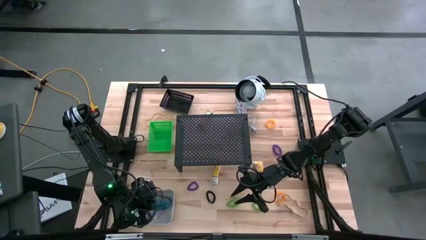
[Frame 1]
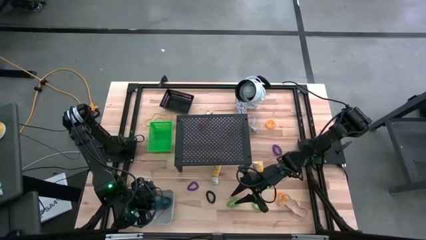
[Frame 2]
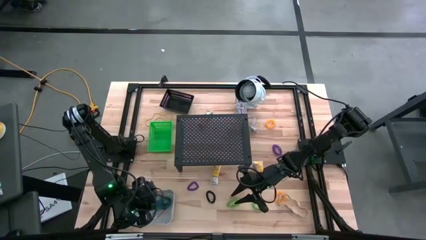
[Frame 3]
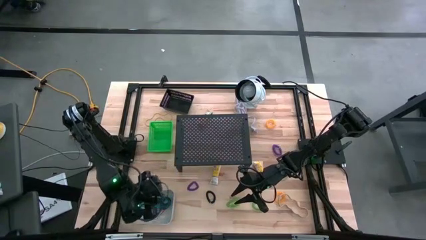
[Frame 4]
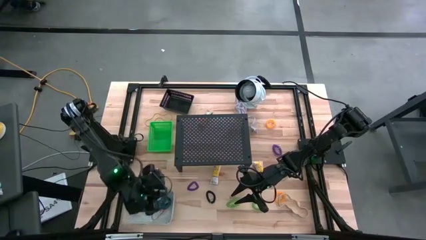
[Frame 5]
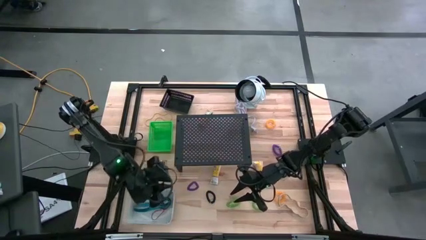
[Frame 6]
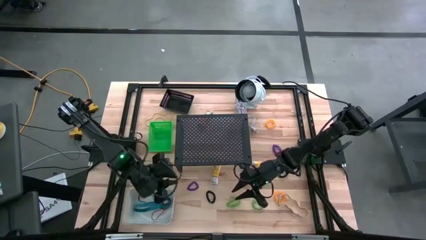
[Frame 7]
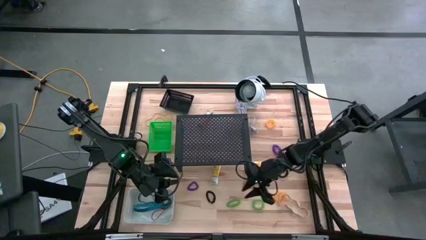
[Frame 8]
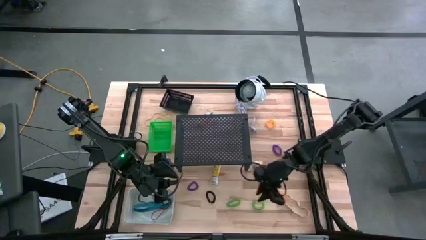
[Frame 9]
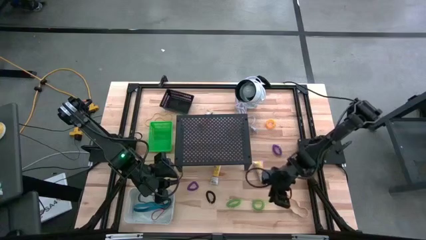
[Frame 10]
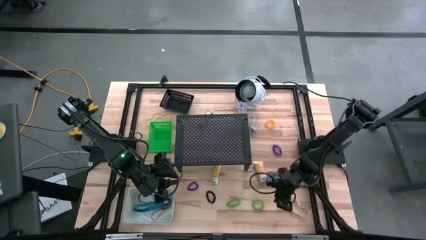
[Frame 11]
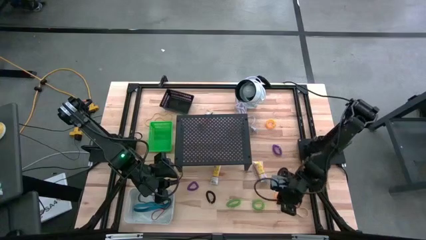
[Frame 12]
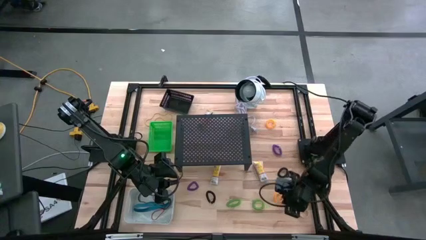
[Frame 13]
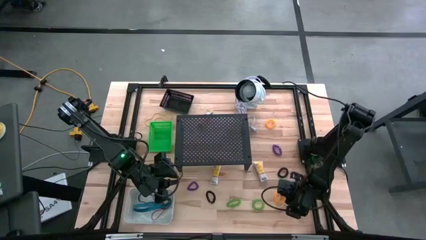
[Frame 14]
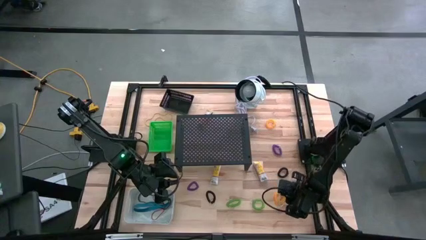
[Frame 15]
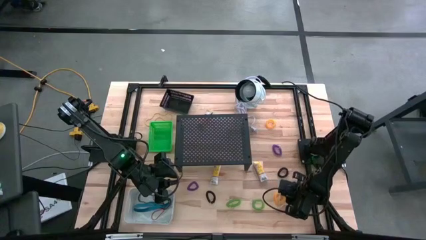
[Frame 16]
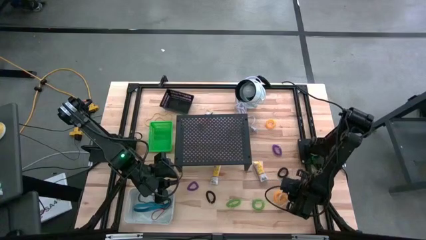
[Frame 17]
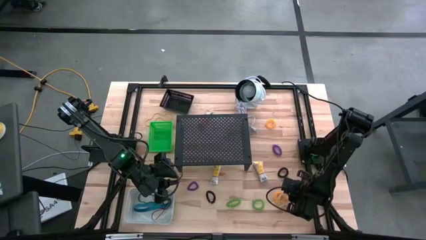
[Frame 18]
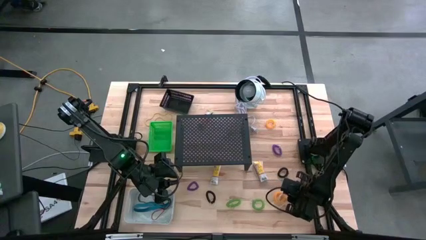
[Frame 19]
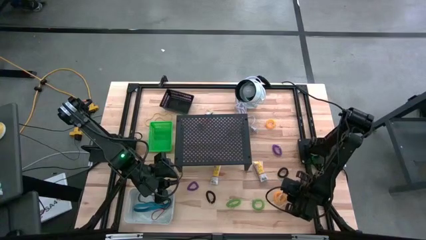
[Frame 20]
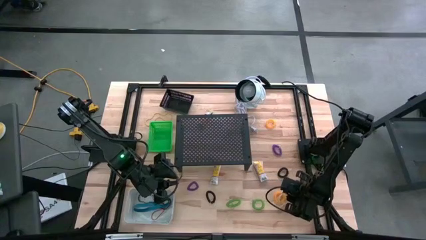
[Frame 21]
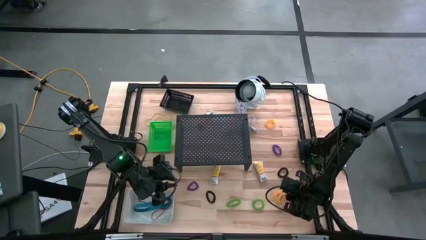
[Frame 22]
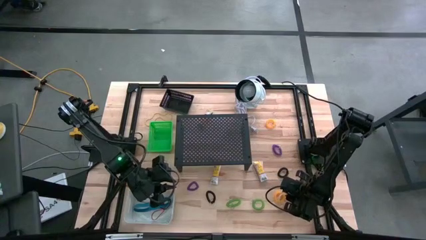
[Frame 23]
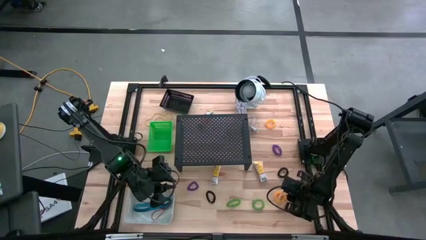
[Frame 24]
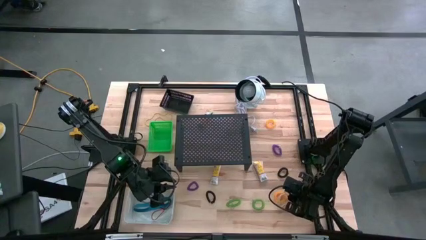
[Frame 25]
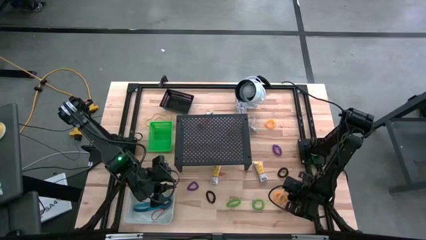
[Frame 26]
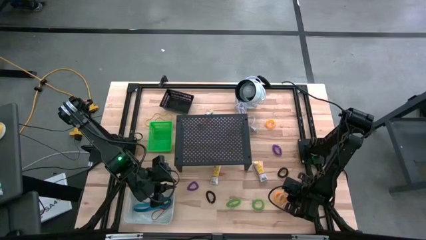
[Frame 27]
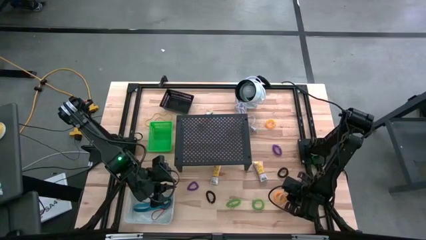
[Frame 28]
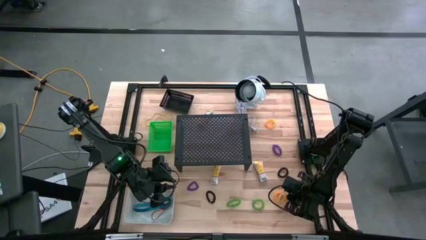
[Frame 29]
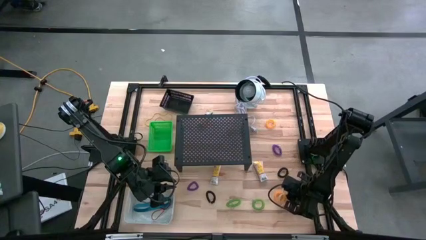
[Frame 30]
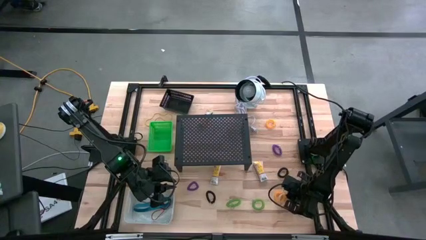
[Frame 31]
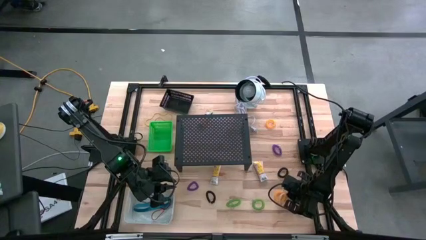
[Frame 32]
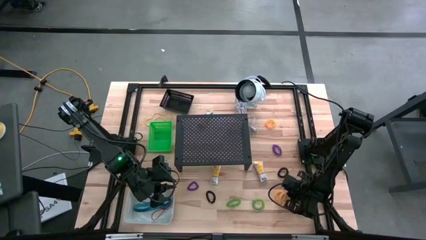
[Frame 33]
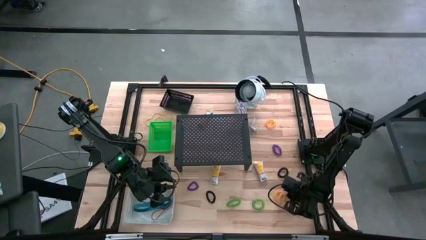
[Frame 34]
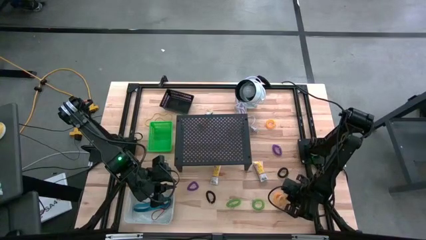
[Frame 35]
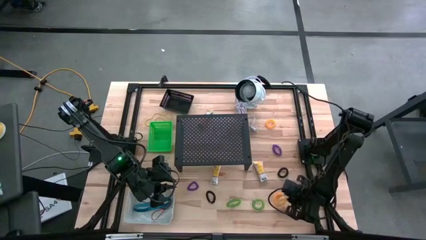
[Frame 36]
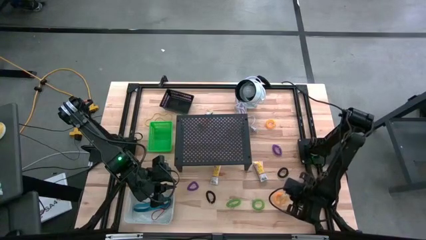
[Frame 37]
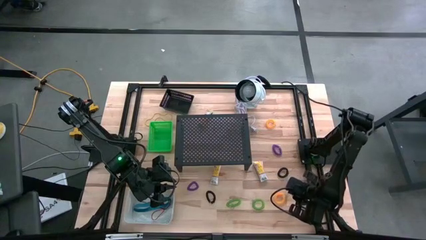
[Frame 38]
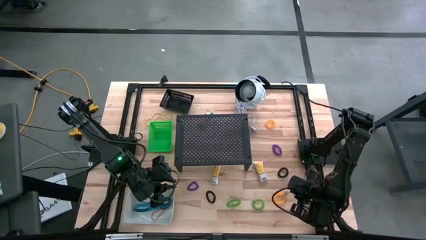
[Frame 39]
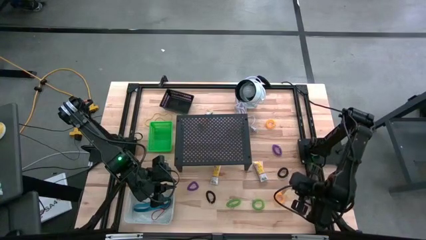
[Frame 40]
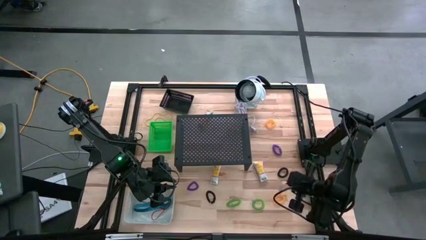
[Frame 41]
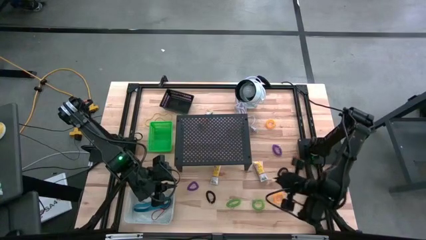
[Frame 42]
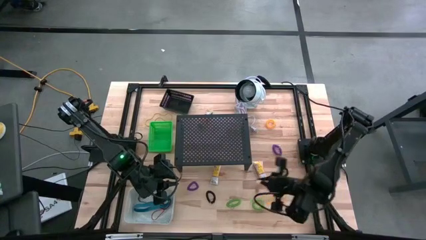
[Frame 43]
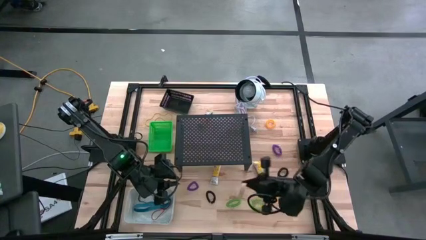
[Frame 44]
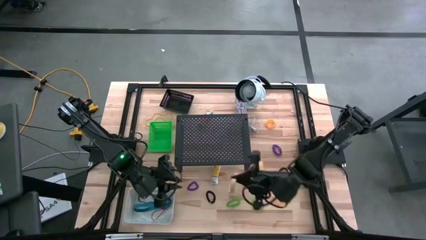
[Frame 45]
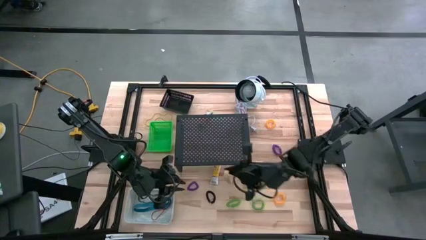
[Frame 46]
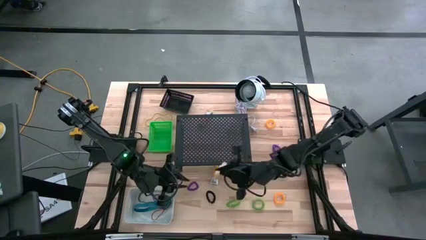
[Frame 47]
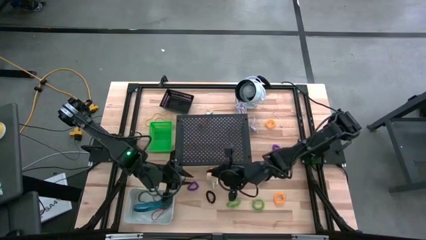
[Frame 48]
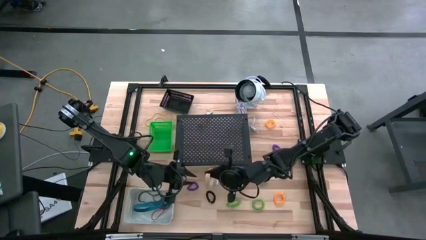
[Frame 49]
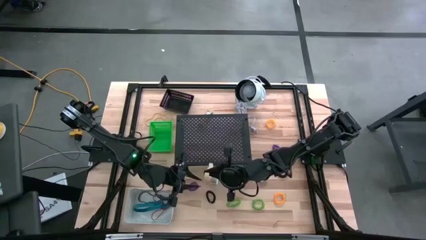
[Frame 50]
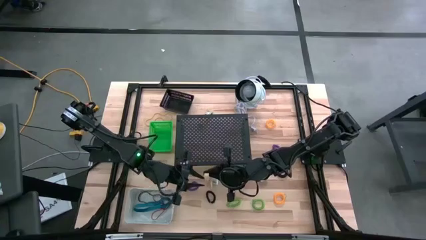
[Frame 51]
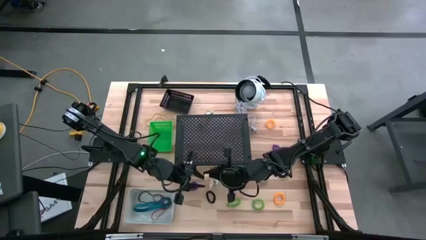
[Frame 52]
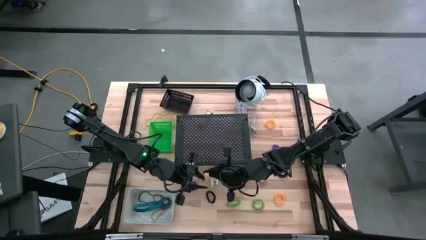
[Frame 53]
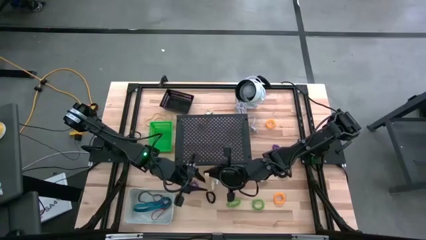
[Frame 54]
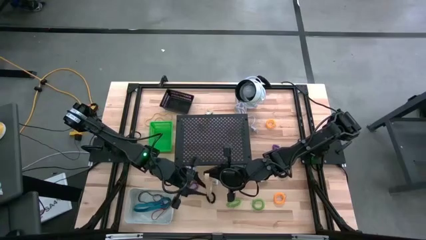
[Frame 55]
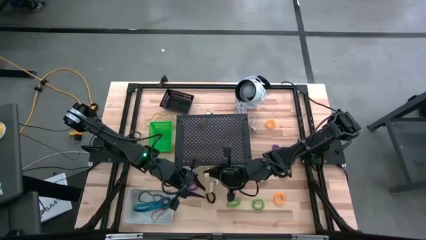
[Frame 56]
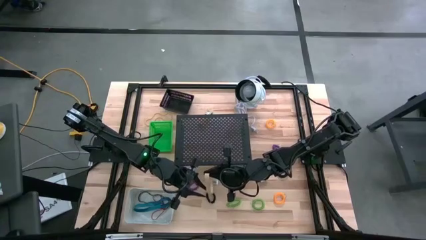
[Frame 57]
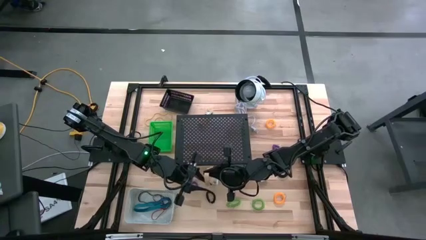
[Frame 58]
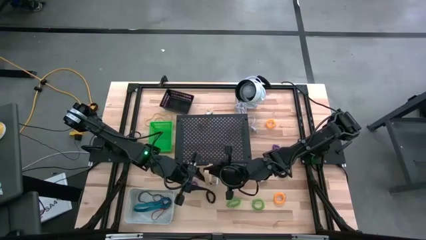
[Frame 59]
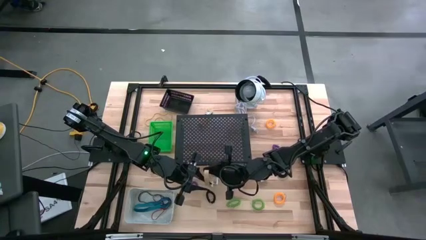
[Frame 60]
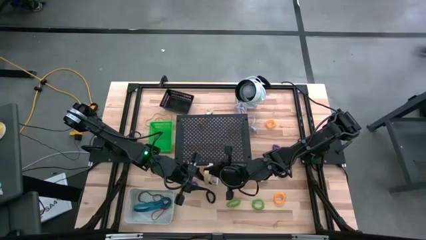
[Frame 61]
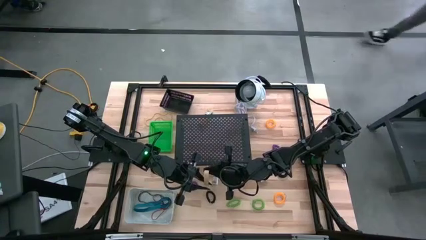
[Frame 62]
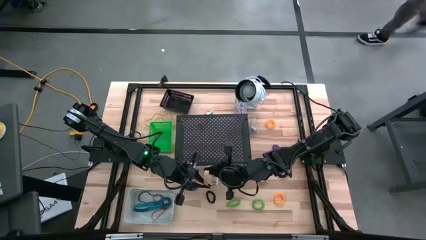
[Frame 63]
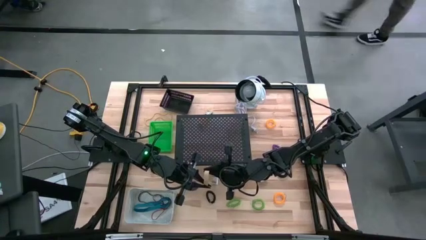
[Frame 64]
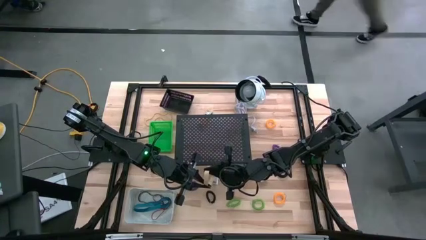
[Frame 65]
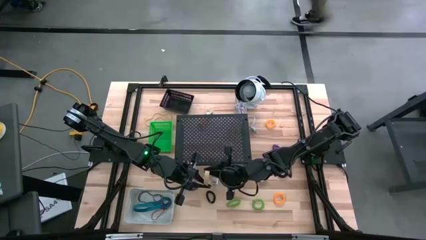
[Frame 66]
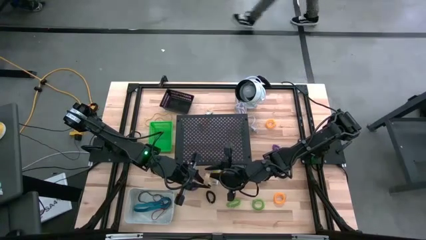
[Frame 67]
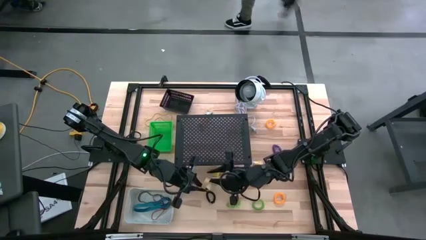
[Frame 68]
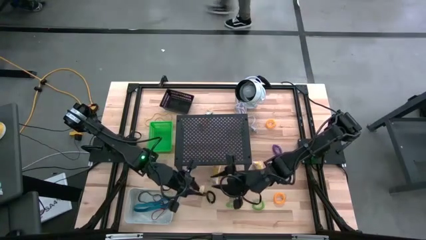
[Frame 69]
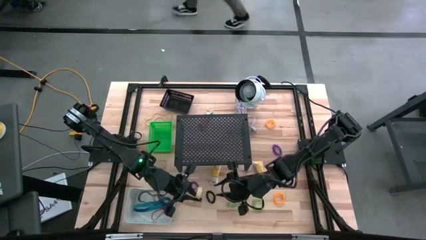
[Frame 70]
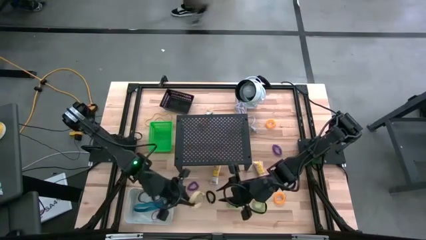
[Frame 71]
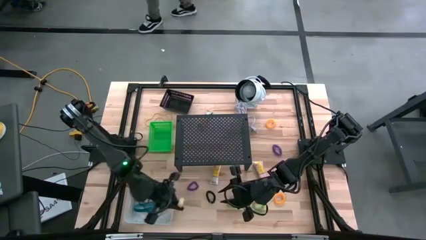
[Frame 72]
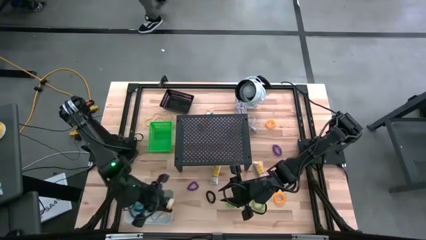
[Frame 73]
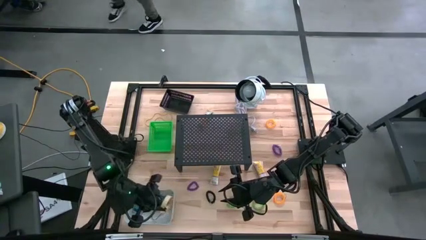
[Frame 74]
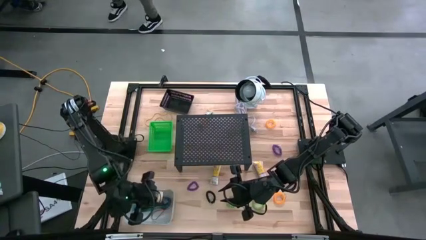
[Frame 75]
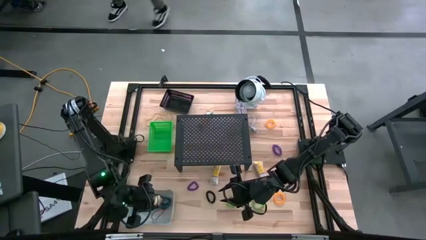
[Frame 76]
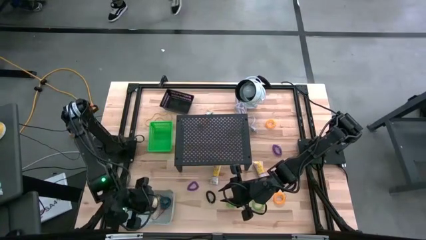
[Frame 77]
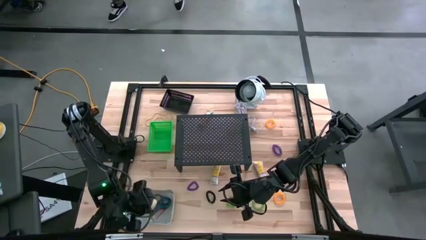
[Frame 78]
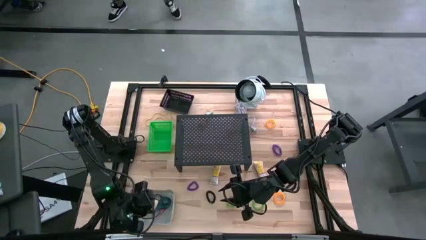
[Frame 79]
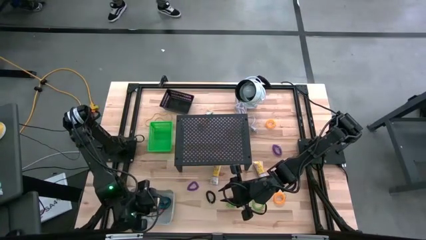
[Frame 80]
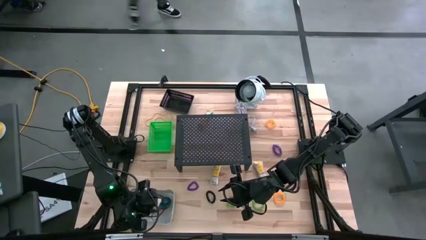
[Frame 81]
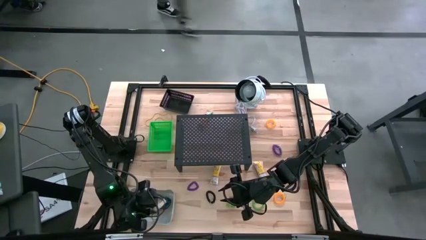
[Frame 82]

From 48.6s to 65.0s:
Task: Pick & Place Office Desk Supplies
Put the brown rubber band into the white bin

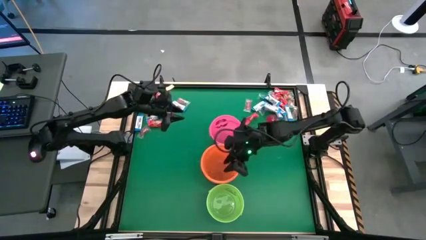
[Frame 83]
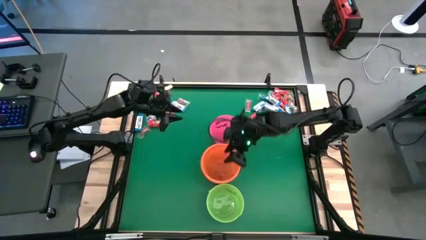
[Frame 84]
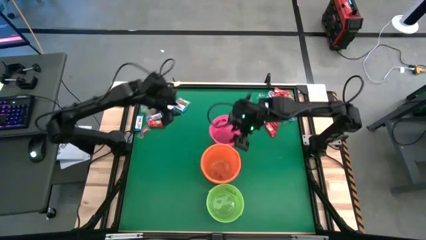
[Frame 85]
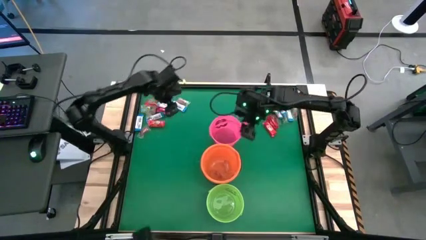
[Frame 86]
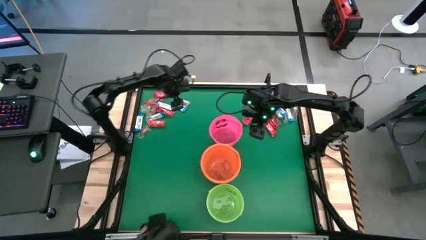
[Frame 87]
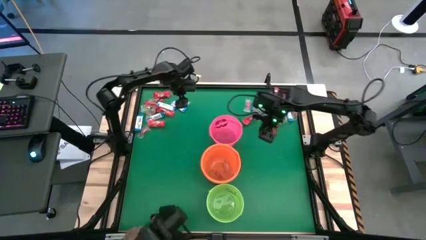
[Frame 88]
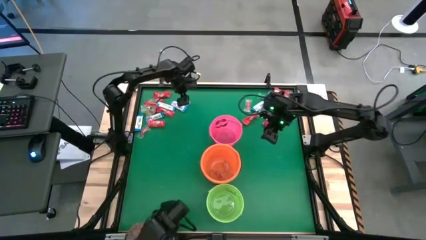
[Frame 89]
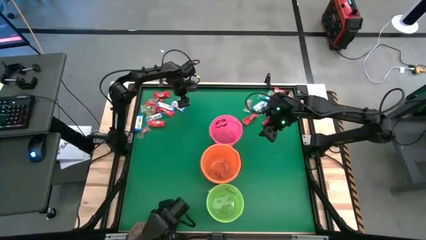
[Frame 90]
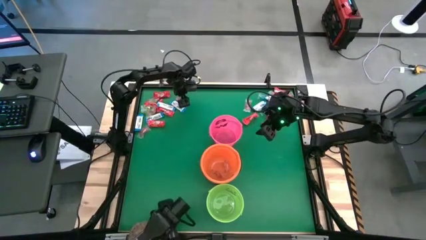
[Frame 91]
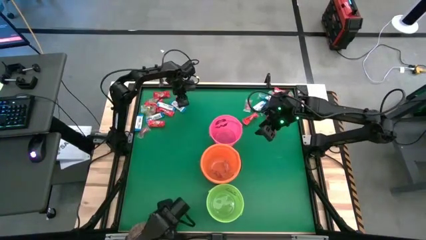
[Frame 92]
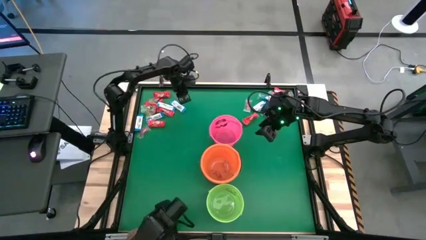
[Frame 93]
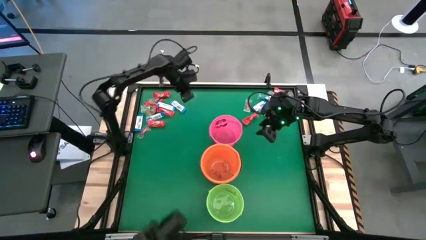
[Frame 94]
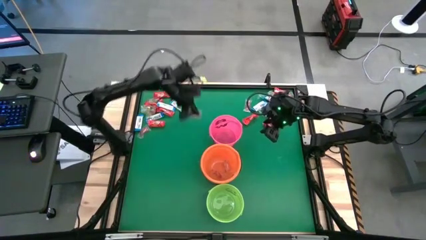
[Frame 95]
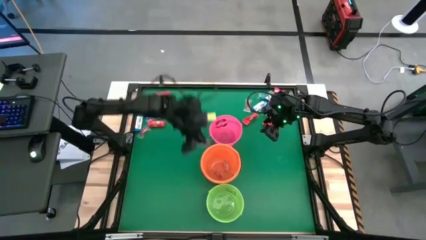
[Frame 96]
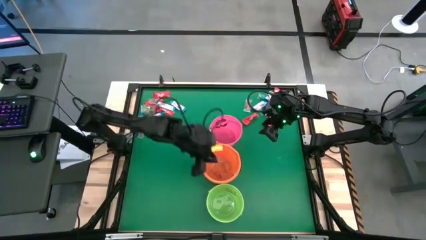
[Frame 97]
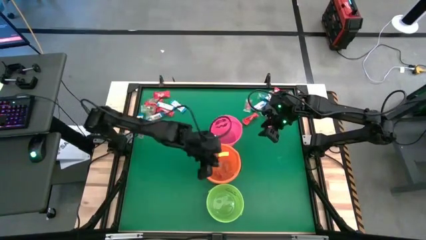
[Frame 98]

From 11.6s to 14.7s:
Task: Sort candy by brand, put in halloween buckets
Put the orange gummy into the orange bucket
